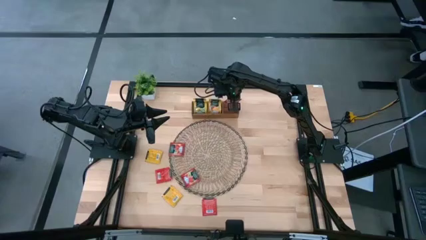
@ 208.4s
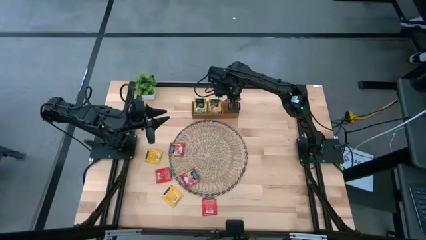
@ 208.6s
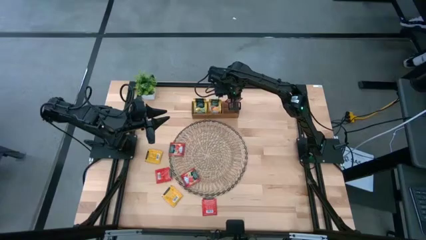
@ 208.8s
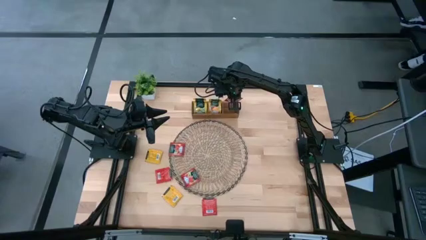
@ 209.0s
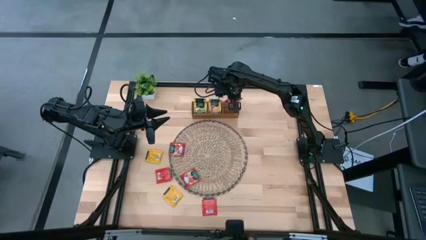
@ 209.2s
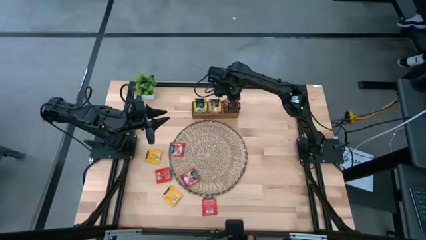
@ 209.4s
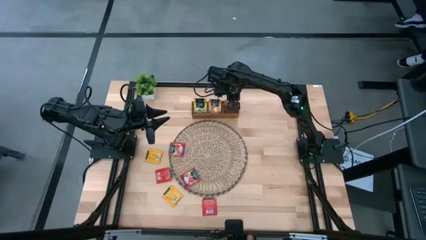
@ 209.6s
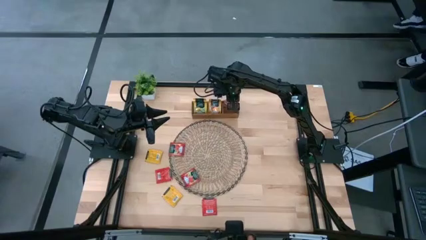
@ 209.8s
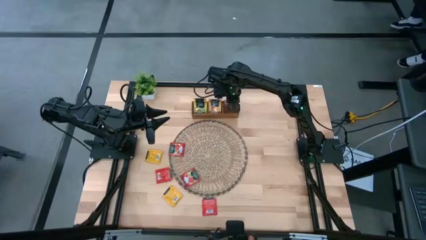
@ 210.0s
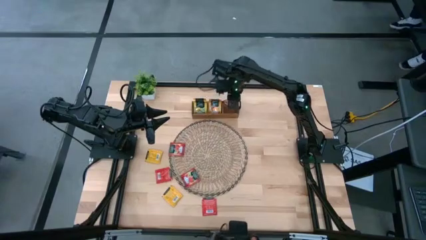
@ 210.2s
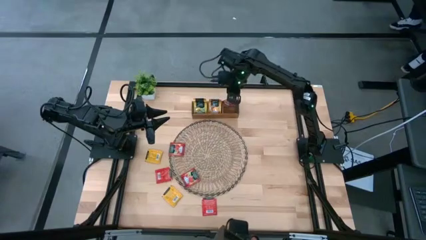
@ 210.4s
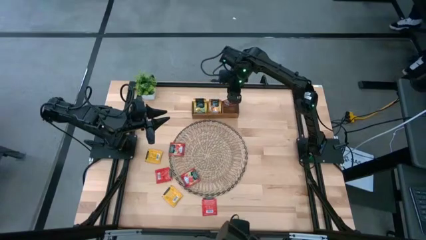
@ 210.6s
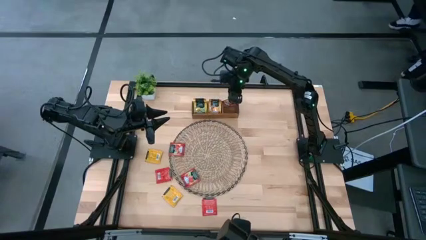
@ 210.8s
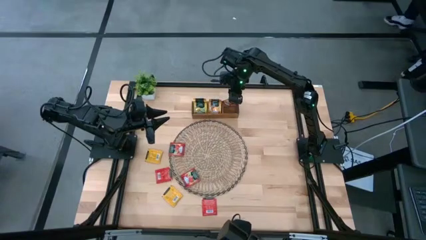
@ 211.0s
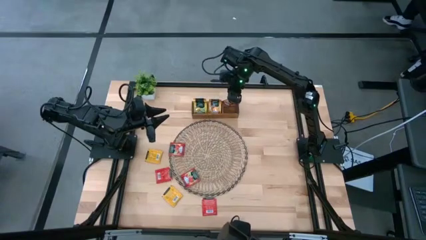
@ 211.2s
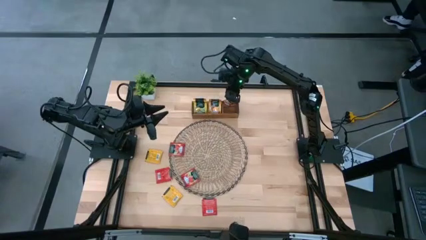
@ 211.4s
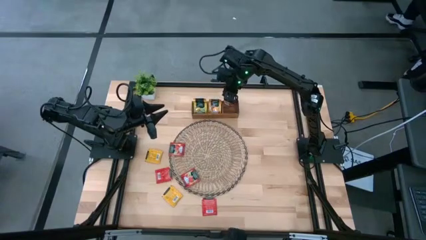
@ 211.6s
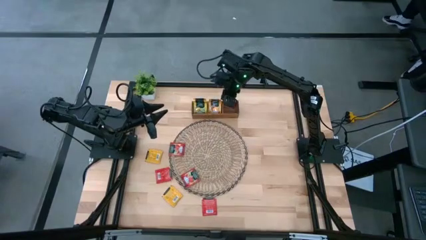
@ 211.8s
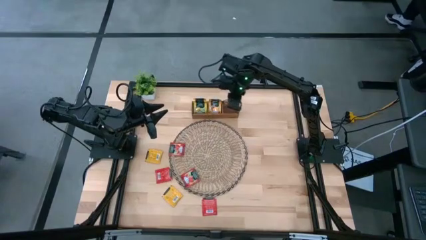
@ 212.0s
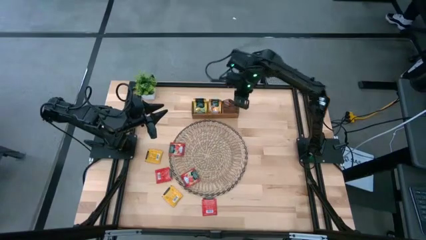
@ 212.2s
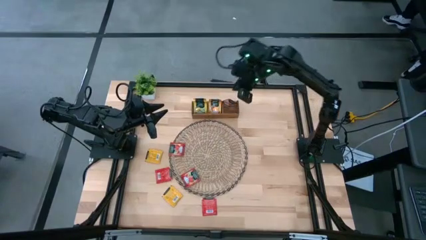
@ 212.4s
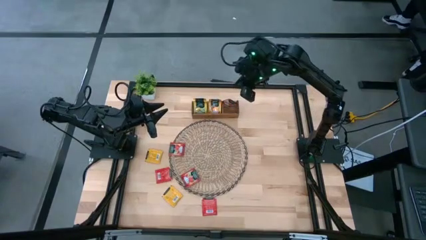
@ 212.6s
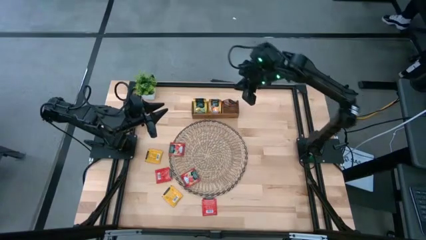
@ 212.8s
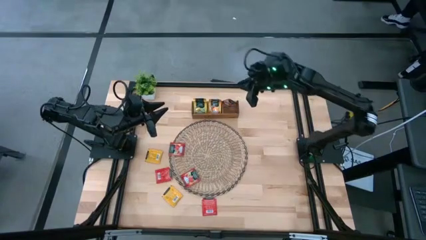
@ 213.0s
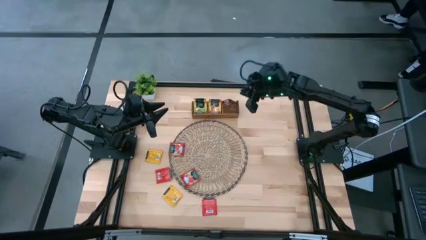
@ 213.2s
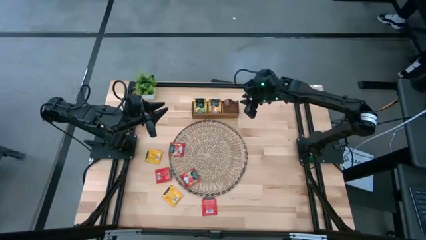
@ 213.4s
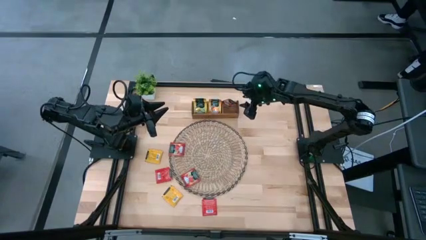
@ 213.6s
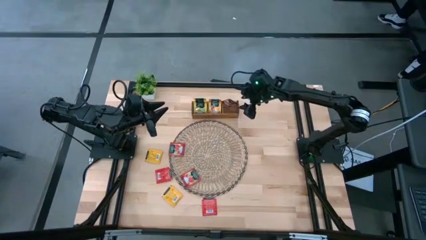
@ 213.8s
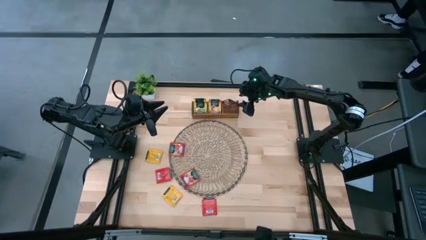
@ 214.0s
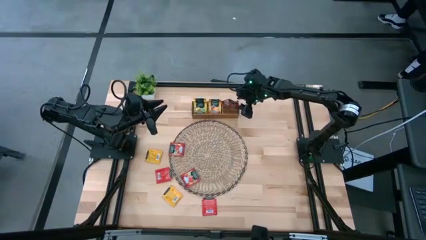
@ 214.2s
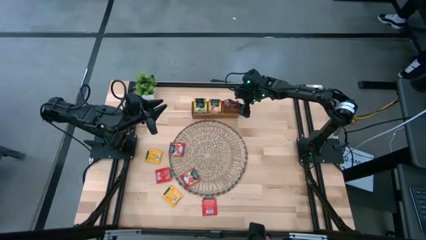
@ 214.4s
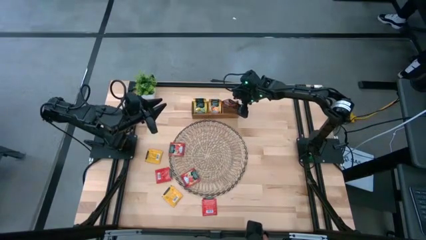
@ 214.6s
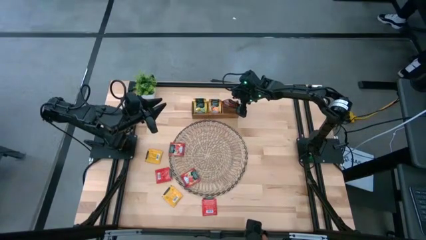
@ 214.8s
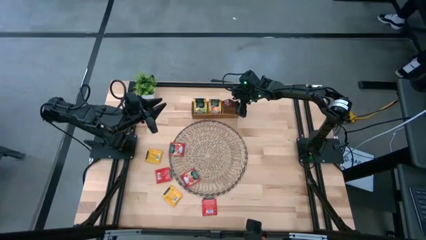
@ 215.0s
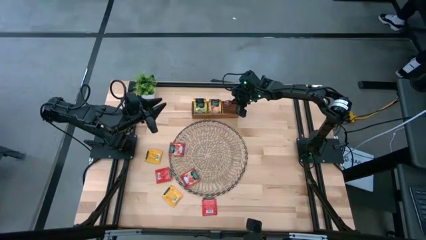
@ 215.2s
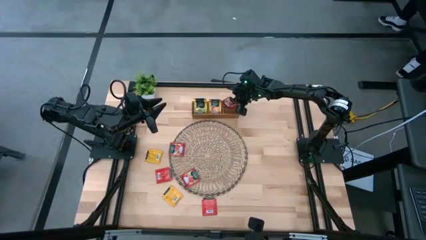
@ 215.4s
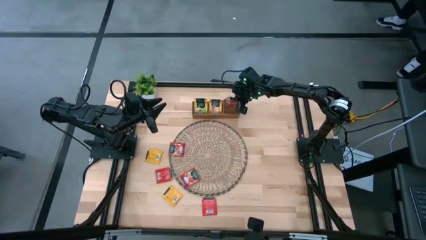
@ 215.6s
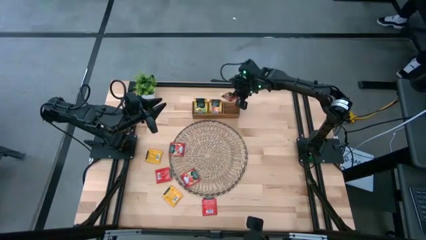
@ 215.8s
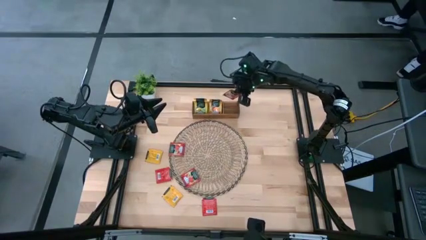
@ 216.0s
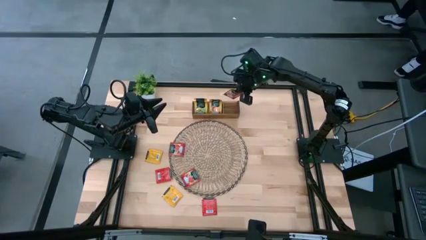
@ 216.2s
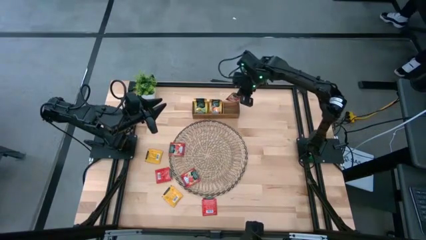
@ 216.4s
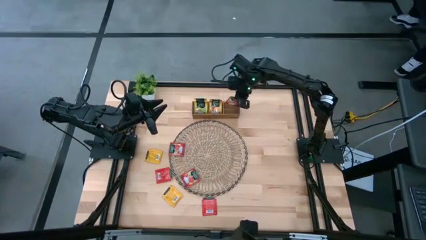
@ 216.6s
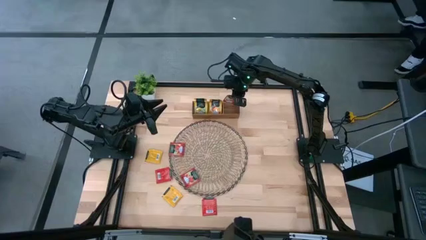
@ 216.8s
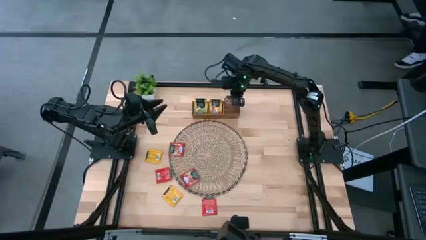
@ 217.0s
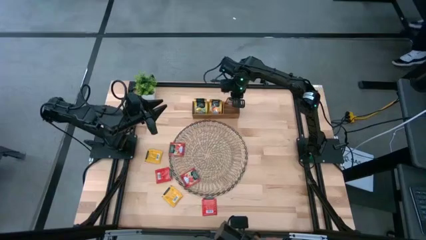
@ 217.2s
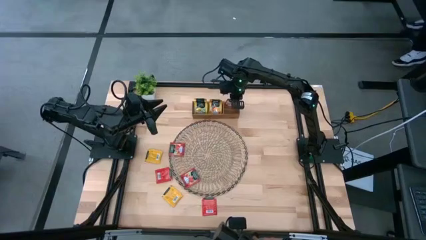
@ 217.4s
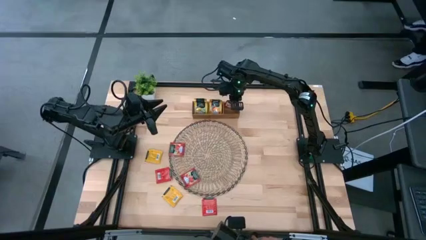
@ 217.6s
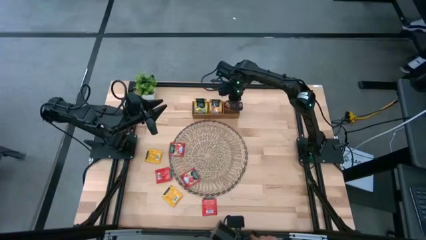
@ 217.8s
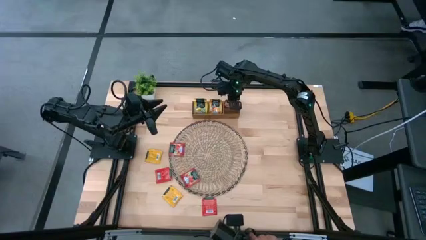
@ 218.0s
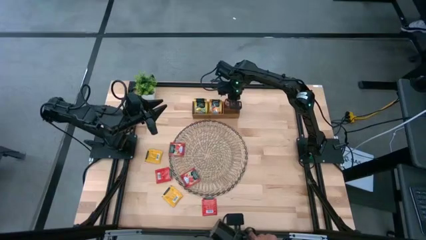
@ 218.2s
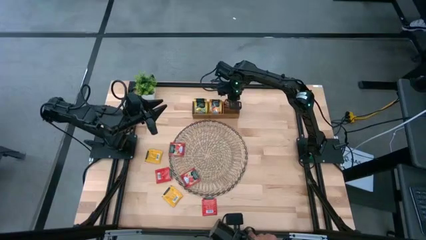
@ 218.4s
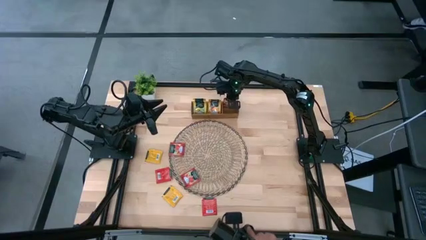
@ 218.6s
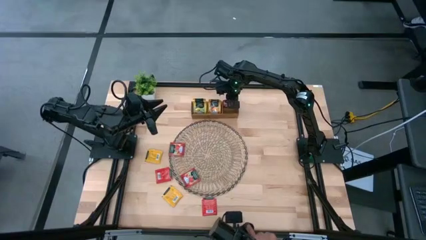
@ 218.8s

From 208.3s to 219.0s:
Task: Pick & Place Tea
Put the red tea bag into the right of the wooden organizer
